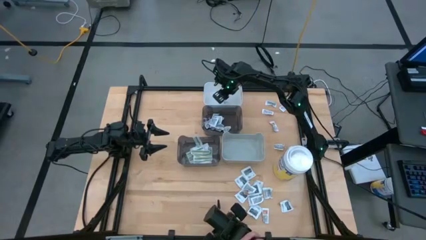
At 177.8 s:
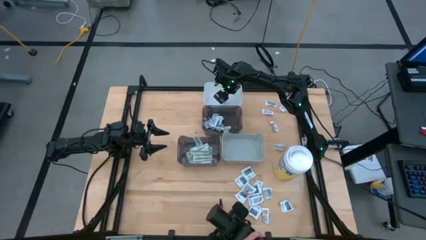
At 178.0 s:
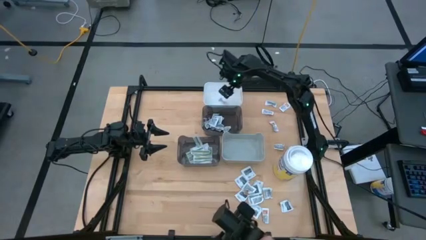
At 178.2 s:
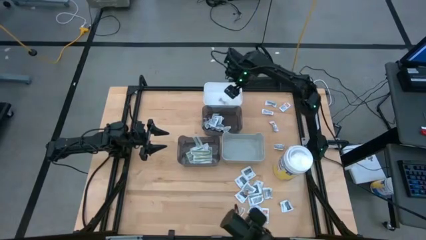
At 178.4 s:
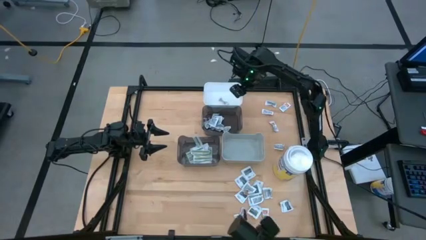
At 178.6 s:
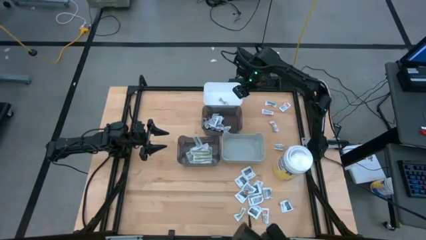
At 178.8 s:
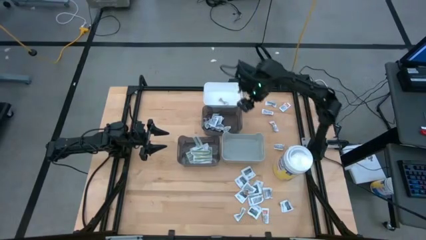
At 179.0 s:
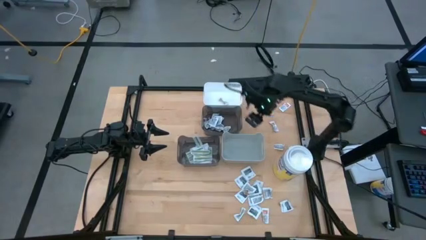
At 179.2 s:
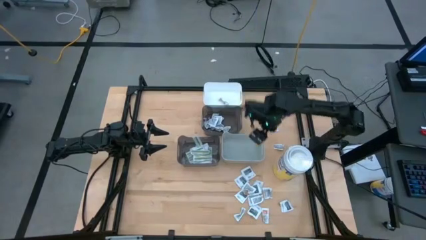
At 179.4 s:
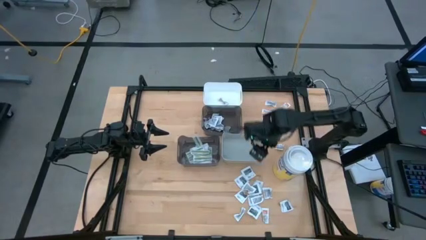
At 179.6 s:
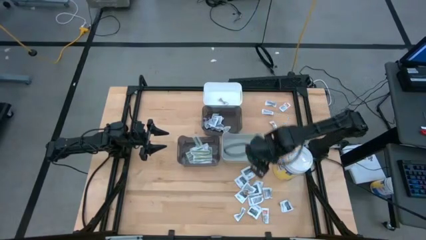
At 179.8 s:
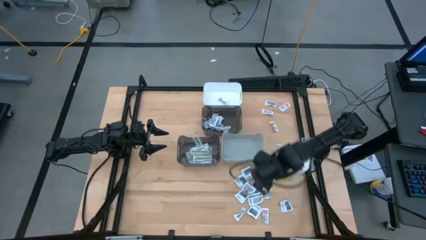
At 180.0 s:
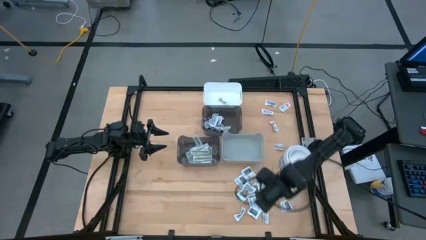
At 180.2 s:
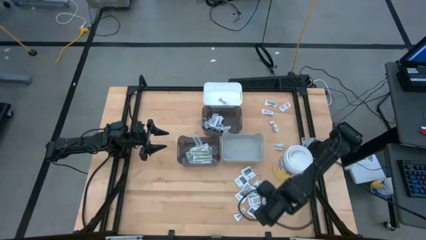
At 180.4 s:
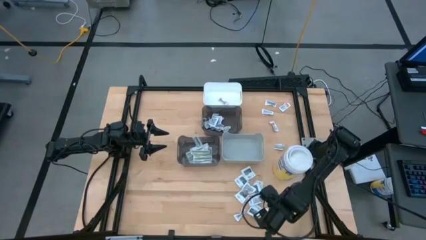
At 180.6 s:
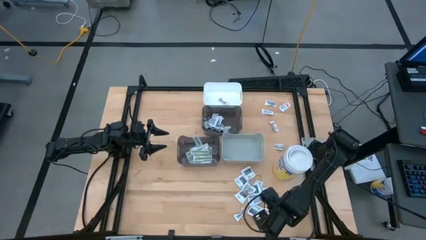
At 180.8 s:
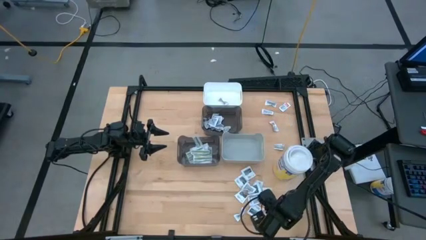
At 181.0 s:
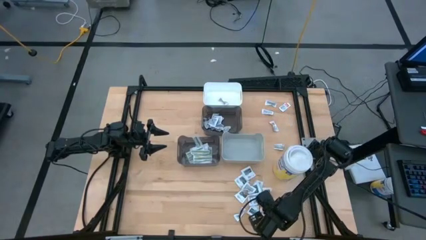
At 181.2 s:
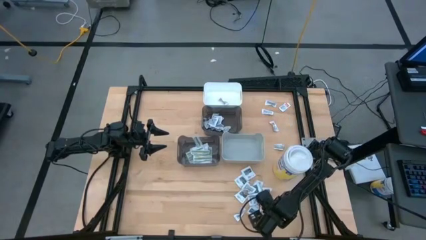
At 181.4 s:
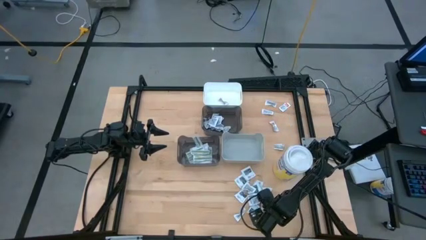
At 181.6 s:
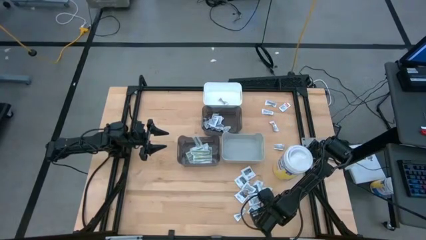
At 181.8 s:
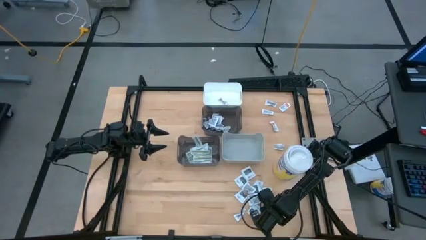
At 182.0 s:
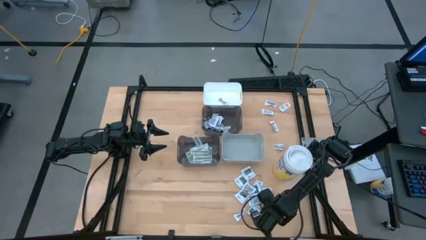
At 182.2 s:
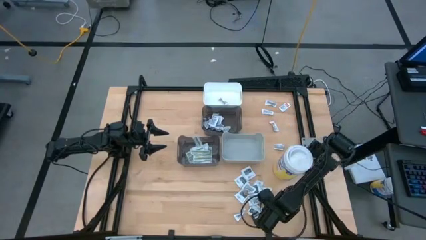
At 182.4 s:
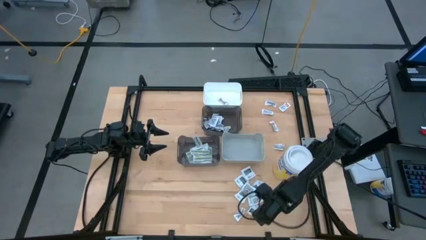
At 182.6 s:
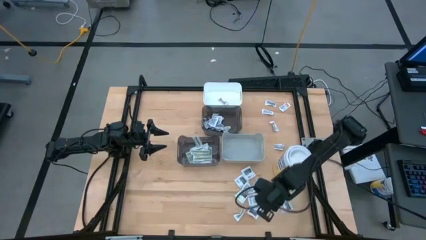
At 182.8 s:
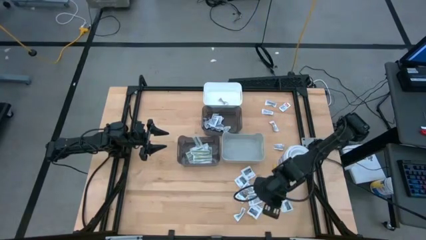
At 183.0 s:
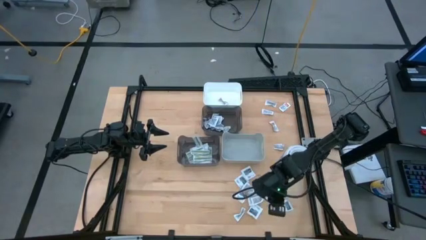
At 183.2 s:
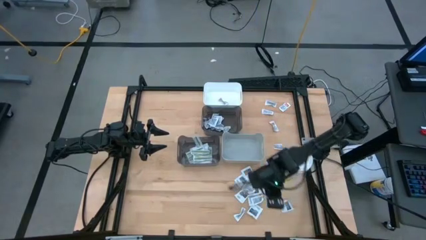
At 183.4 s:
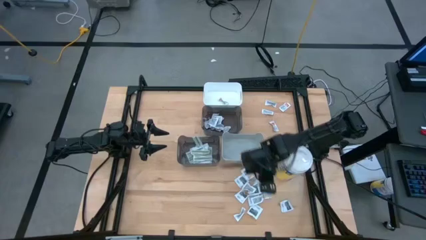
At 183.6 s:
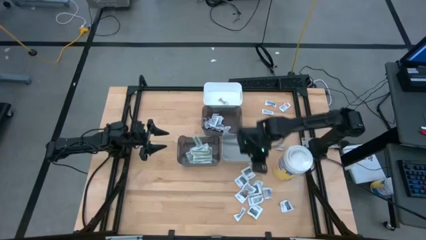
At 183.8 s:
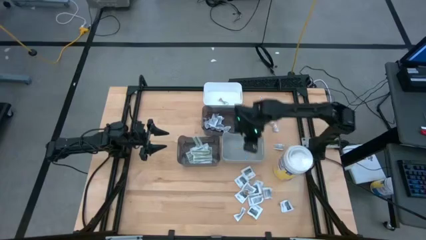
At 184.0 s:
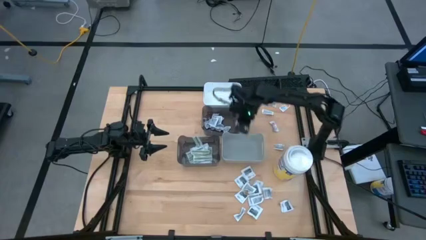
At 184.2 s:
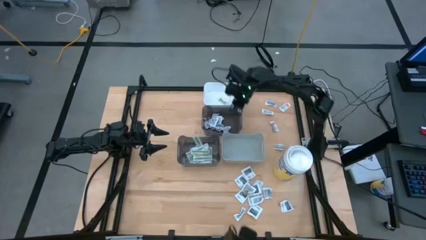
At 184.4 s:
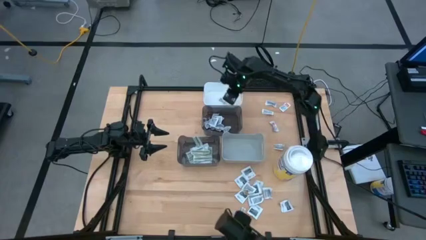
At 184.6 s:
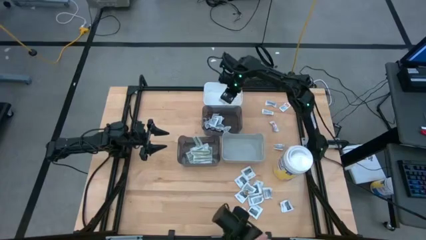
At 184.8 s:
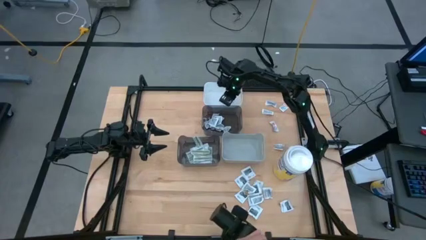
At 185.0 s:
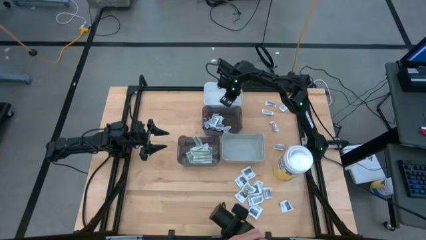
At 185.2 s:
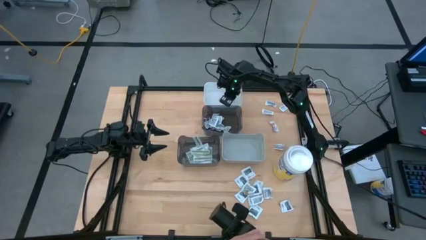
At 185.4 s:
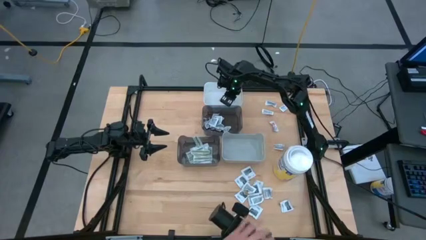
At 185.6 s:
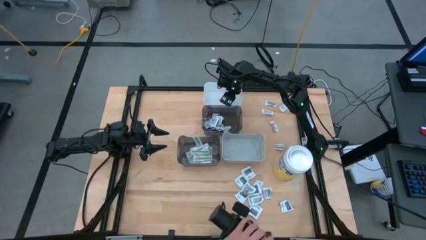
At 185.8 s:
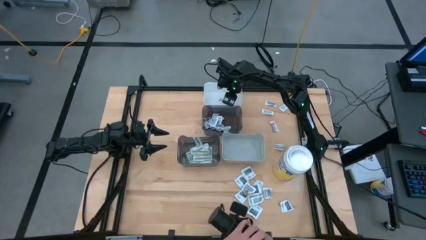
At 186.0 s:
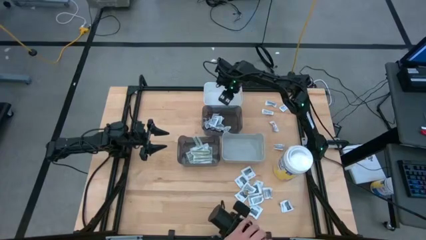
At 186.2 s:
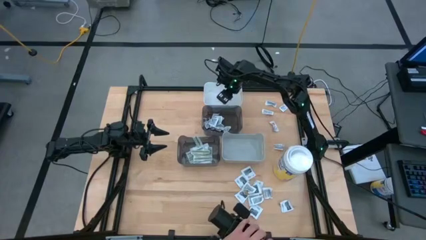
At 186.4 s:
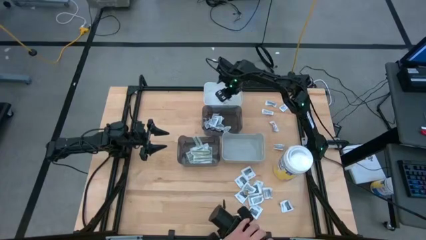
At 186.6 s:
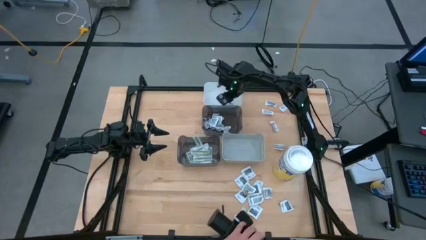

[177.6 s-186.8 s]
Task: Pick & Place First Aid Supplies
Put the white ointment pack into the white bin

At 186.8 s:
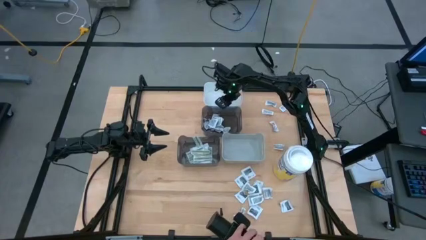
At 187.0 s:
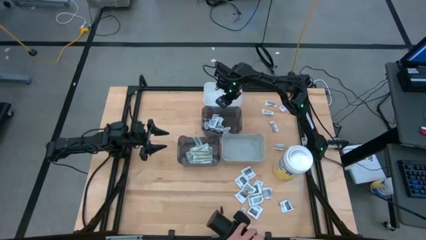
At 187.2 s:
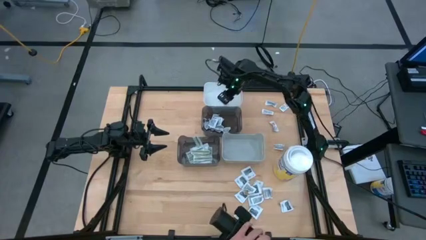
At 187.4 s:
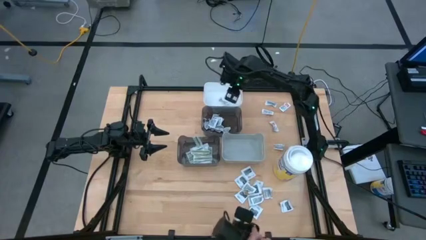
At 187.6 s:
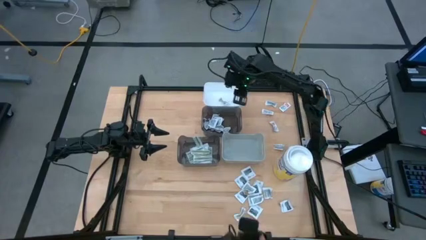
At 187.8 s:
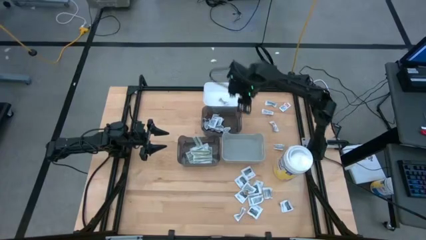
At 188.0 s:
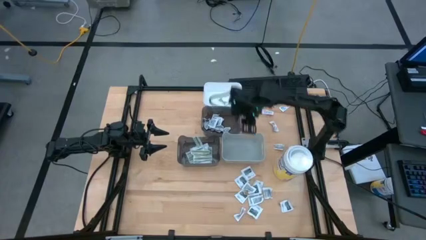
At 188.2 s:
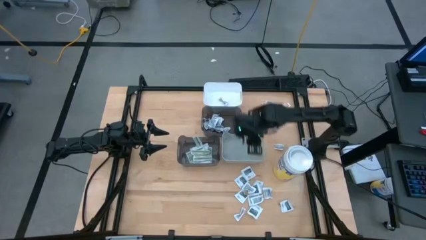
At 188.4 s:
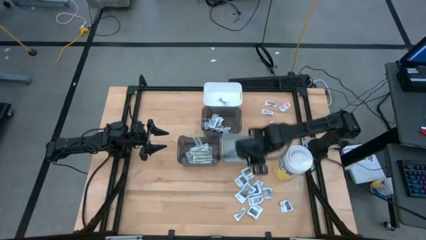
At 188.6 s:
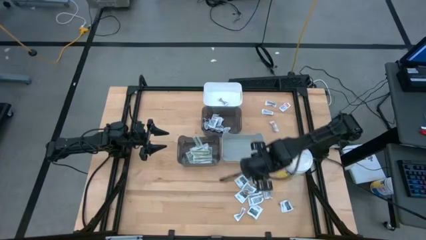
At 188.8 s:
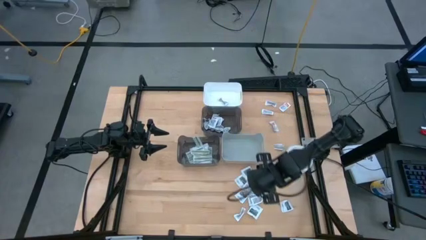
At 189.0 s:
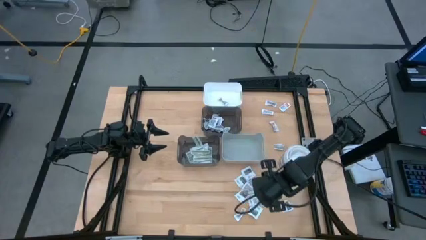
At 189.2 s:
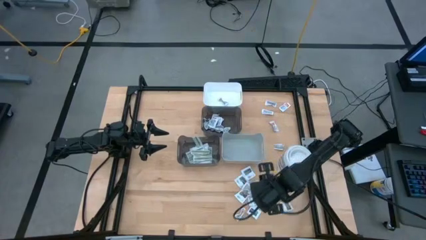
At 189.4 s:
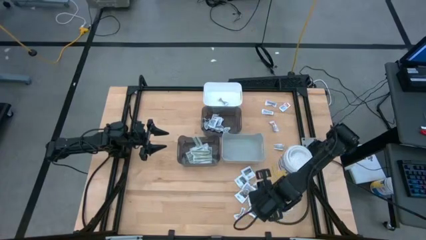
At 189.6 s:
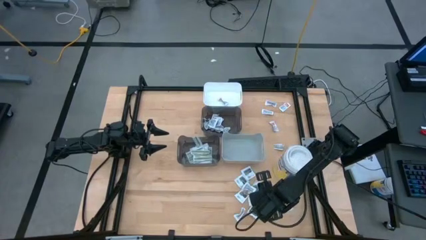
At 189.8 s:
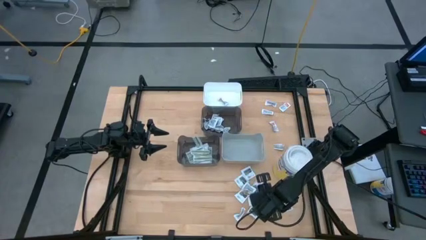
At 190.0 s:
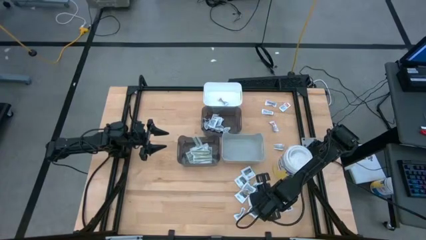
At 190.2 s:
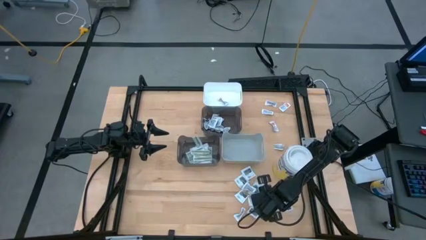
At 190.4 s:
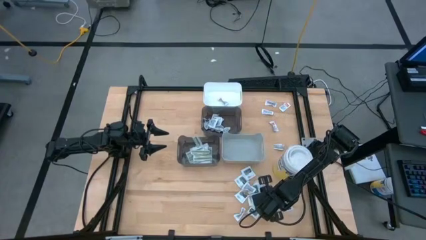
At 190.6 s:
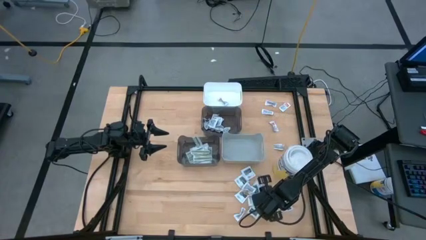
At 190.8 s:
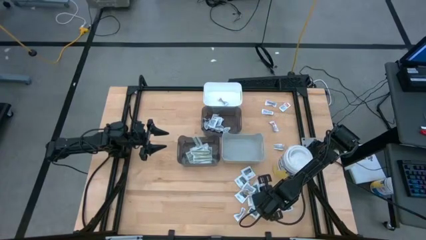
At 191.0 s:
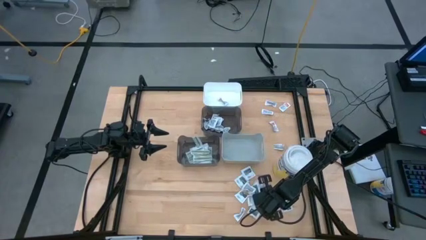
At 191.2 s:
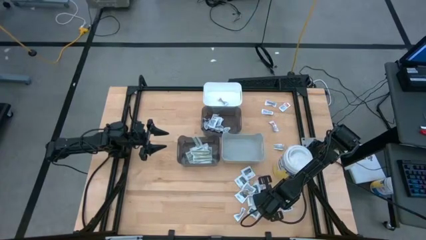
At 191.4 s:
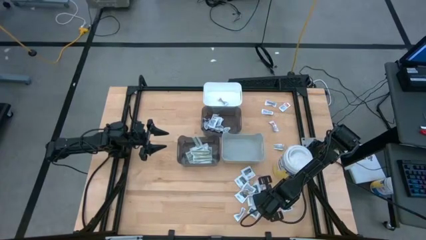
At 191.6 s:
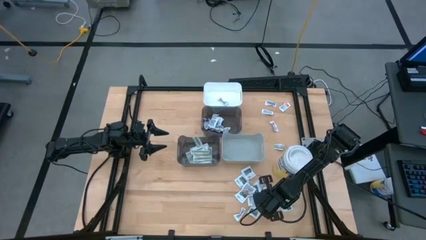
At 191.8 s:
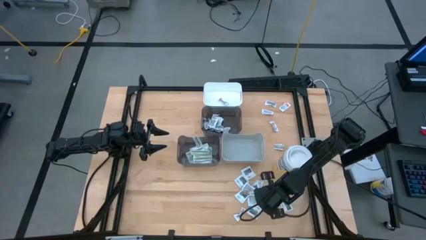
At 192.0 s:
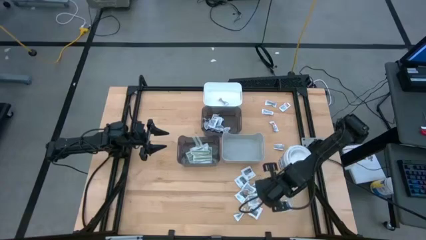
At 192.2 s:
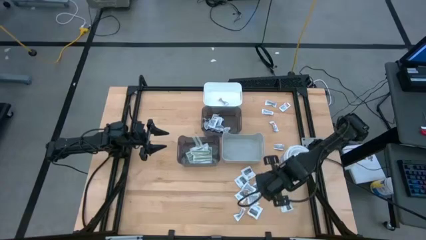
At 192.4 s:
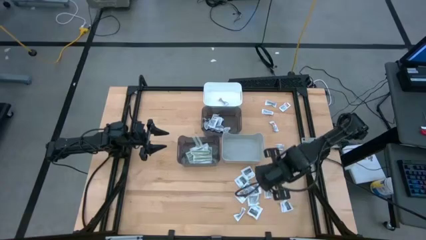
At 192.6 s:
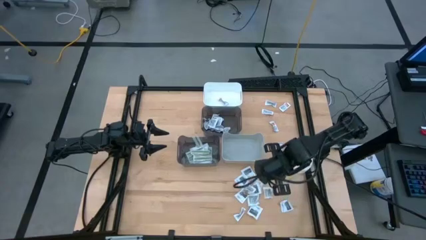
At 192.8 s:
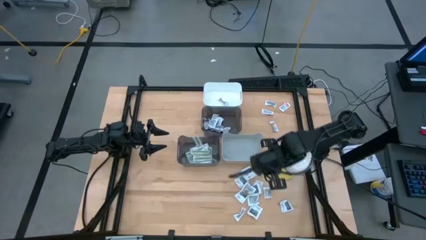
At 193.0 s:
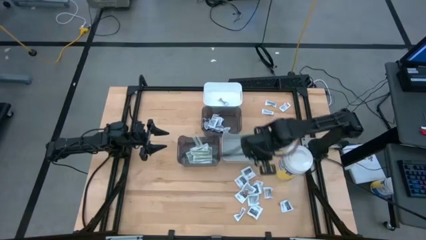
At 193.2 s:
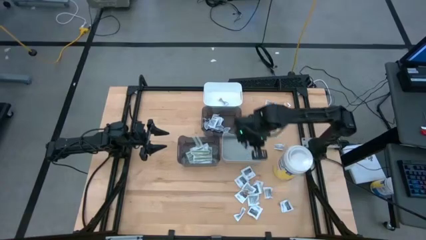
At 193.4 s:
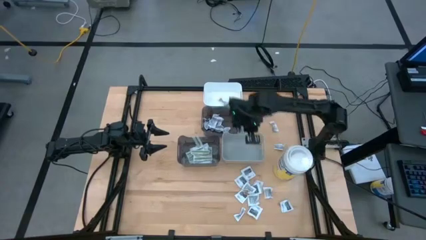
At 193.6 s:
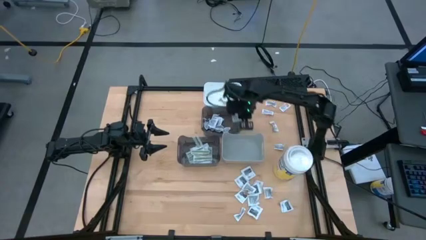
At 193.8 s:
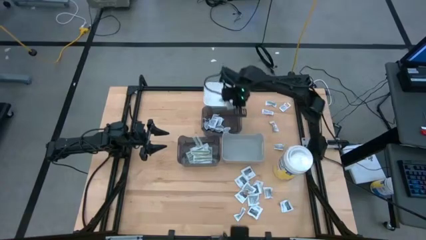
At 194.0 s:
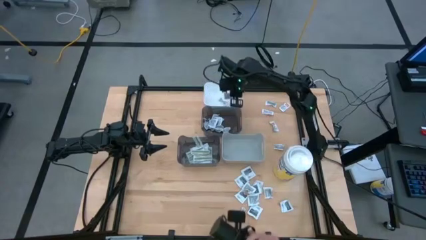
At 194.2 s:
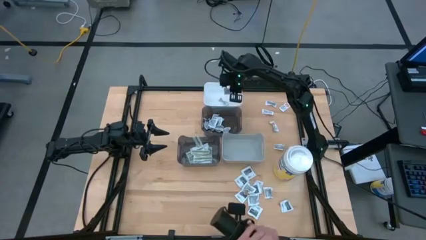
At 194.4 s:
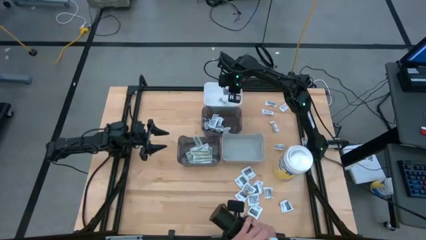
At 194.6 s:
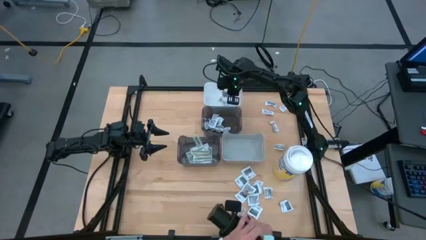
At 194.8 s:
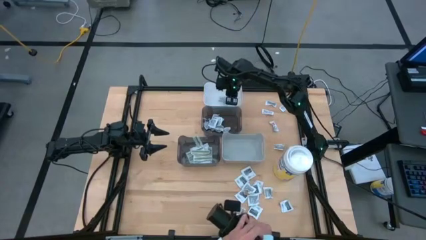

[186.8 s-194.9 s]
Put the white ointment pack into the white bin
